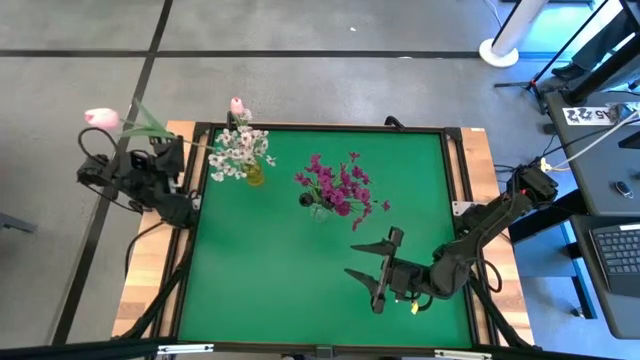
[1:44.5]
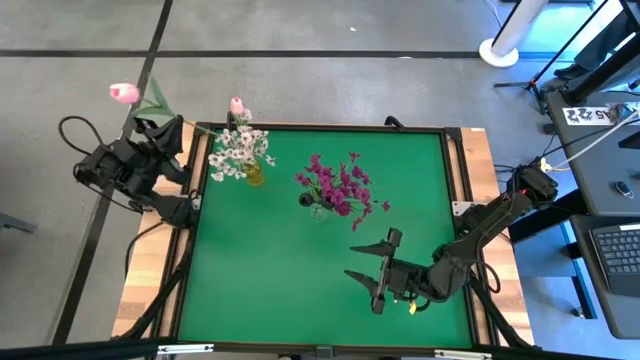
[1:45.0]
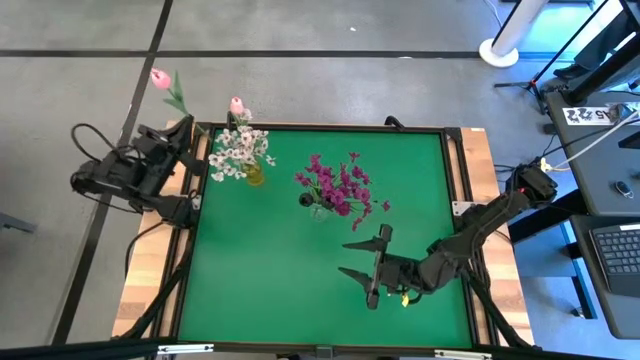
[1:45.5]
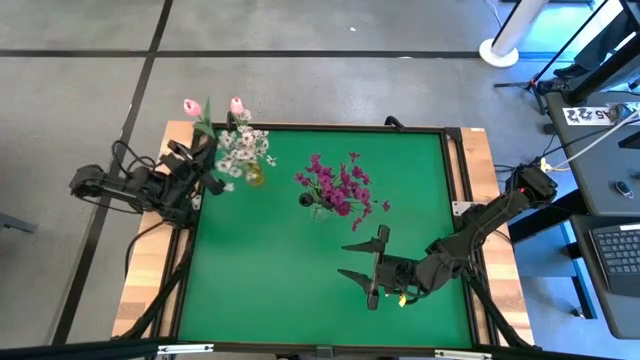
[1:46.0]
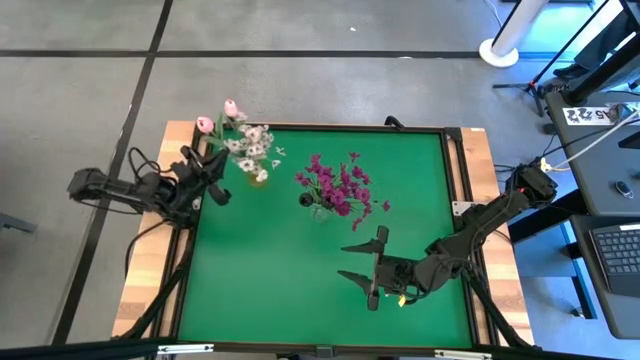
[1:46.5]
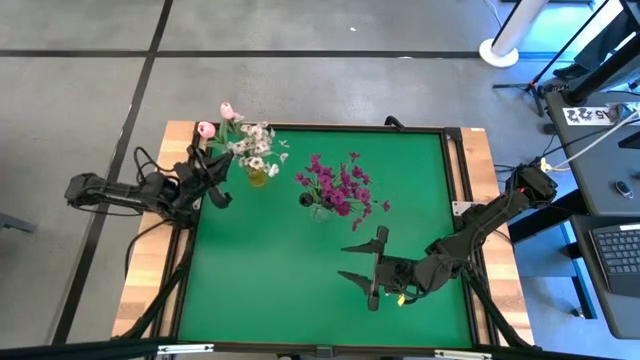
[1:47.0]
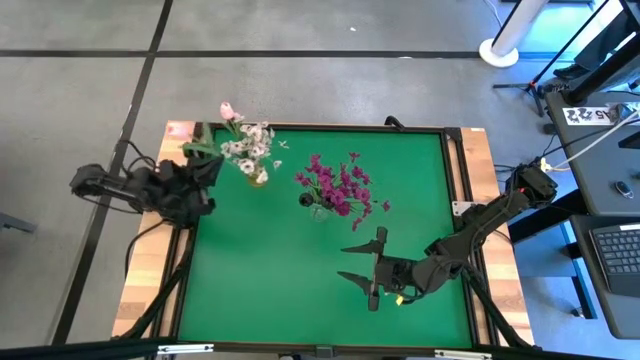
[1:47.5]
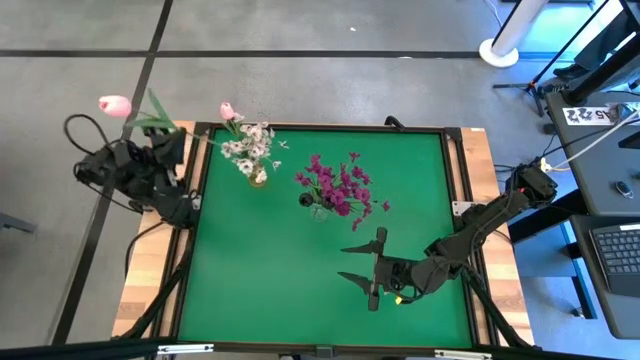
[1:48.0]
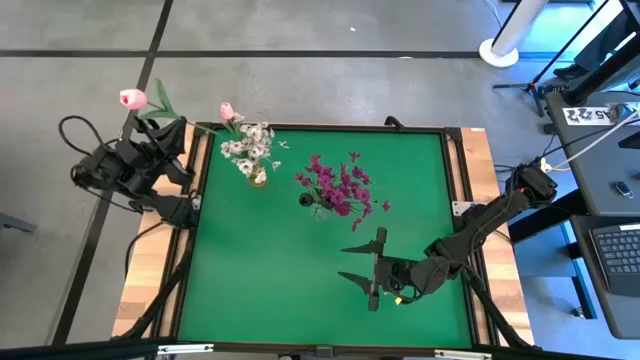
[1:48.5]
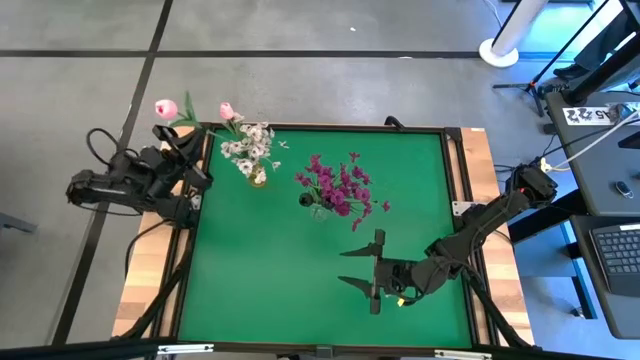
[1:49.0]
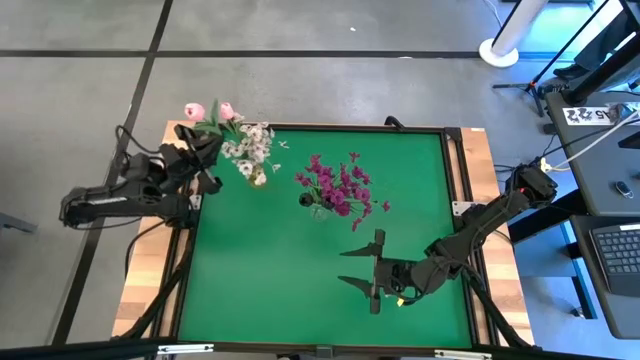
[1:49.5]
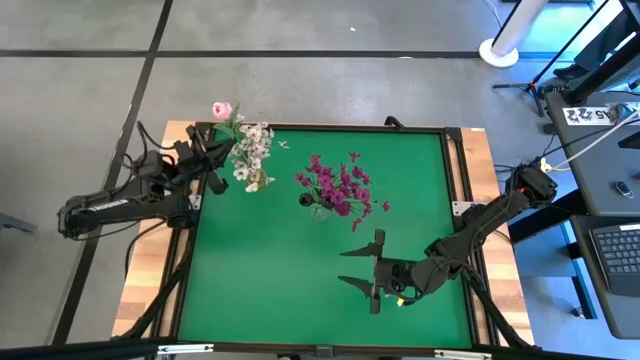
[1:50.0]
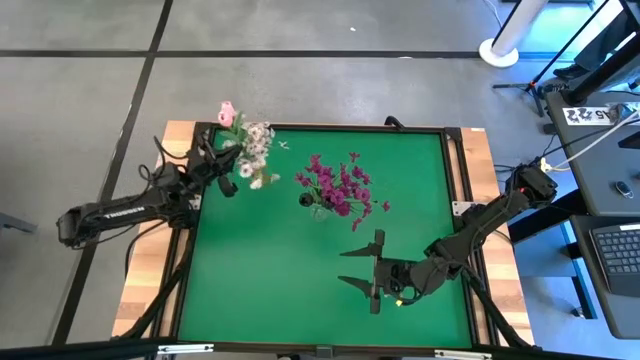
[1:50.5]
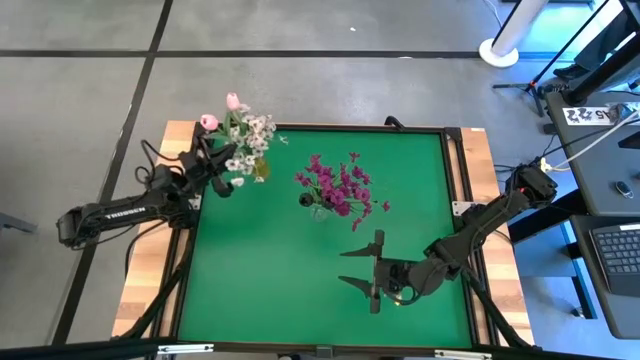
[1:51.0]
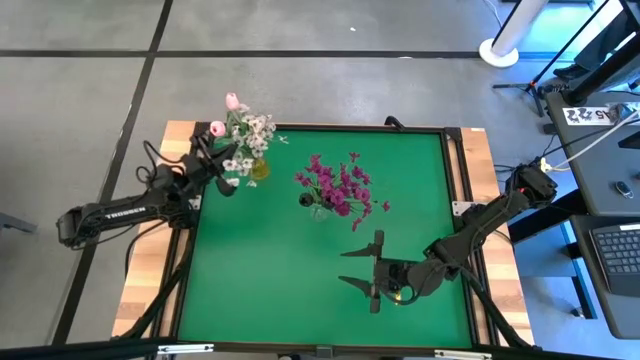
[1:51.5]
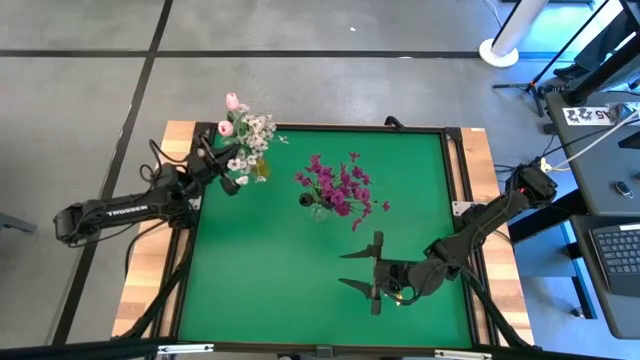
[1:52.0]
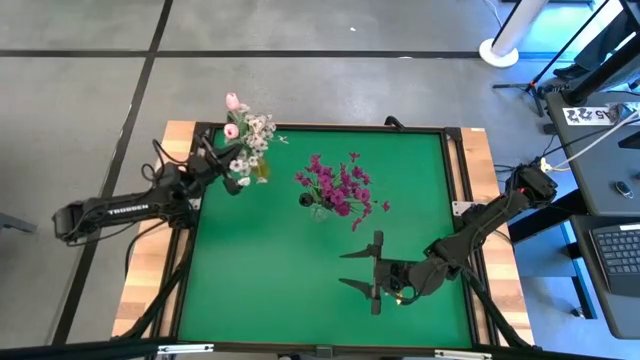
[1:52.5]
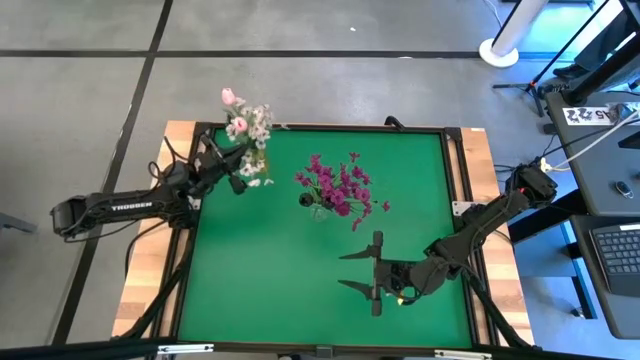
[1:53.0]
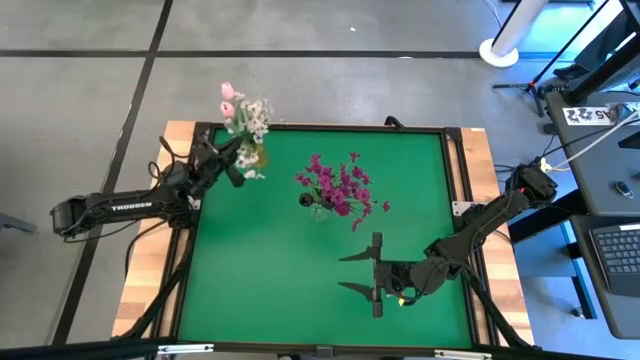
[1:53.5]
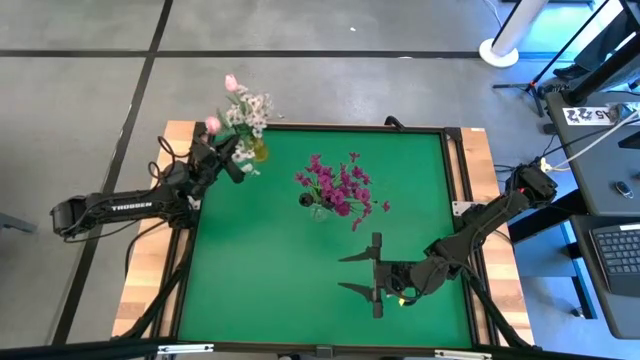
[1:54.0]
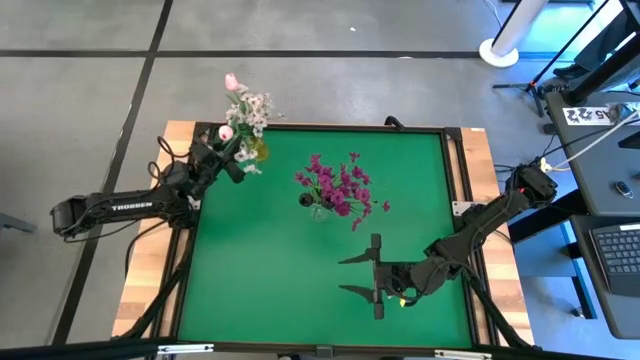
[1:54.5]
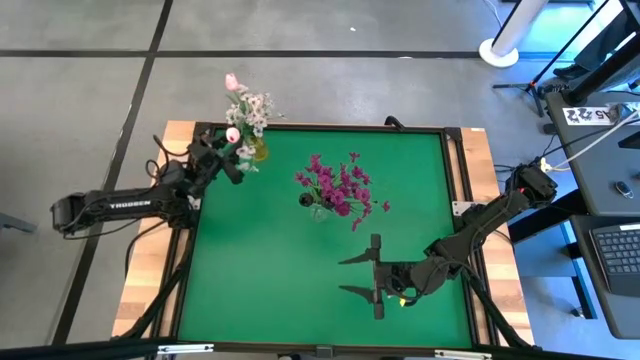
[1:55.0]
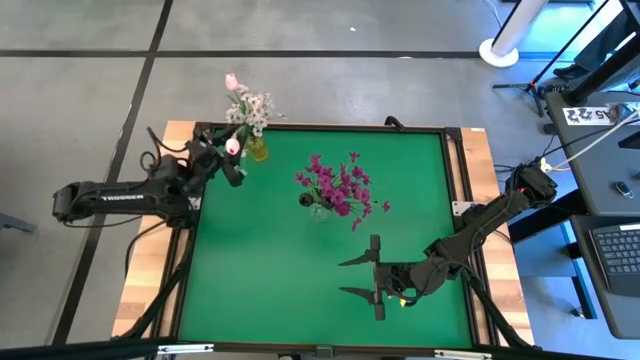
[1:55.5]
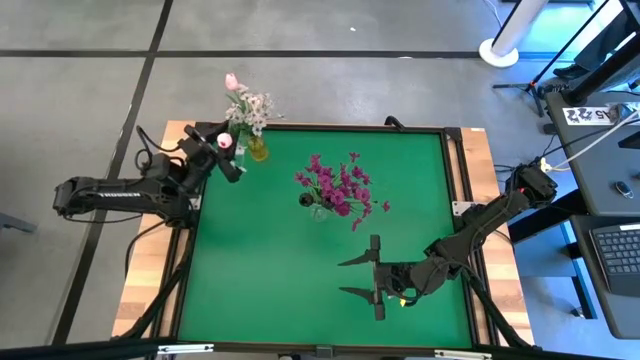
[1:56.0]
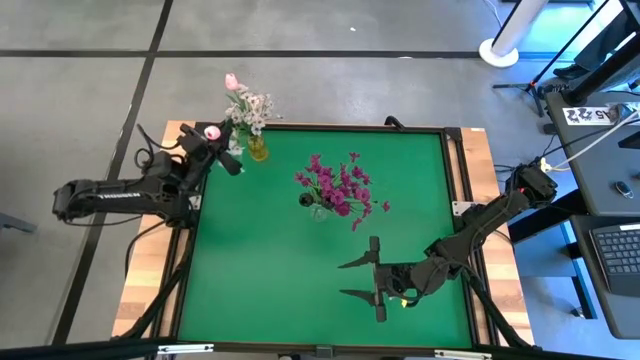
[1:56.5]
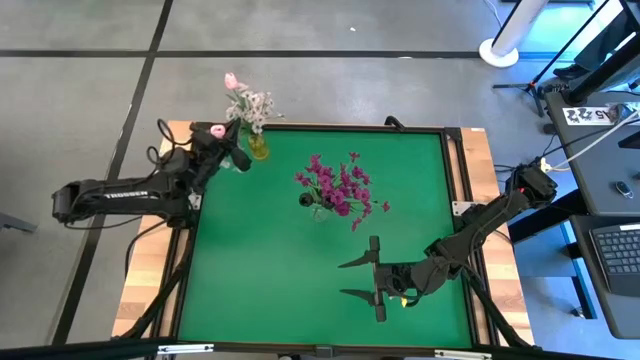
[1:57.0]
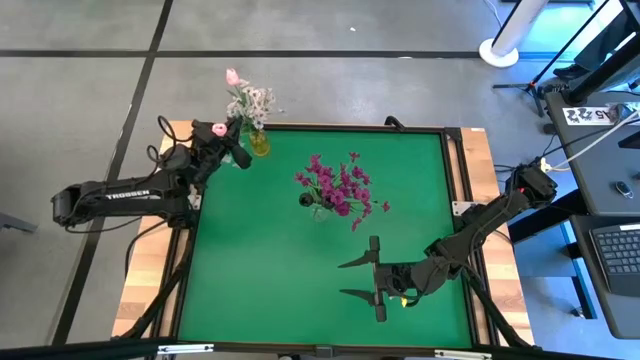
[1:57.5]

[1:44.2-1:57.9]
Task: Sort flowers into vase by color
Put the pink tulip into the yellow vase

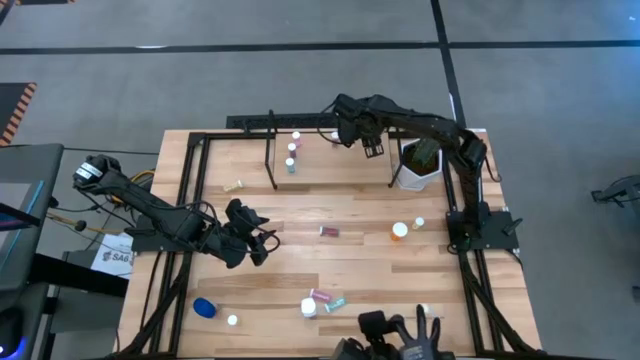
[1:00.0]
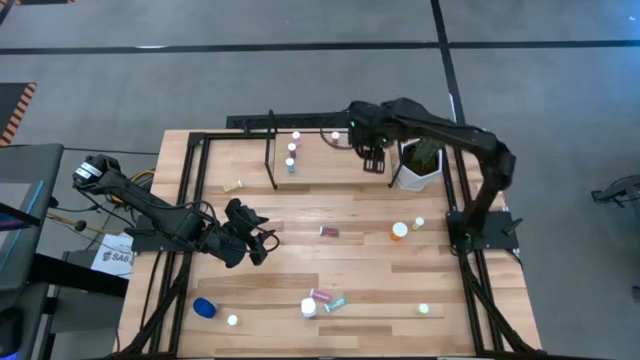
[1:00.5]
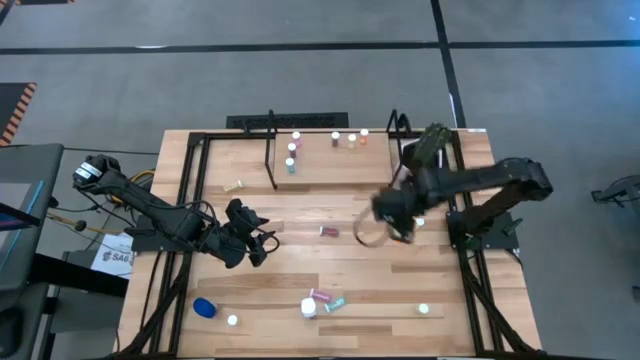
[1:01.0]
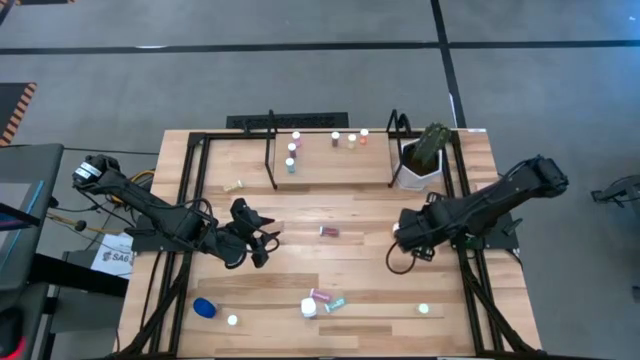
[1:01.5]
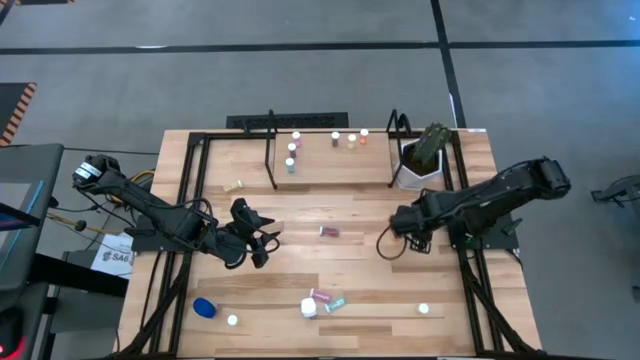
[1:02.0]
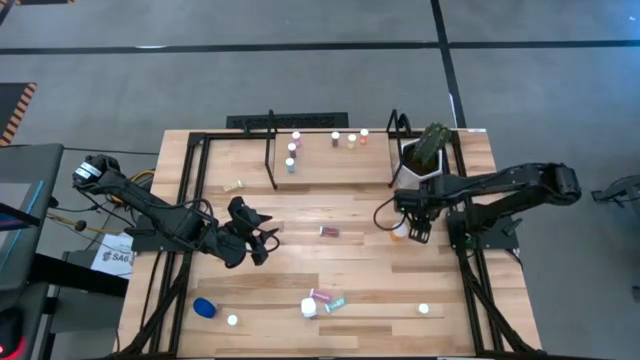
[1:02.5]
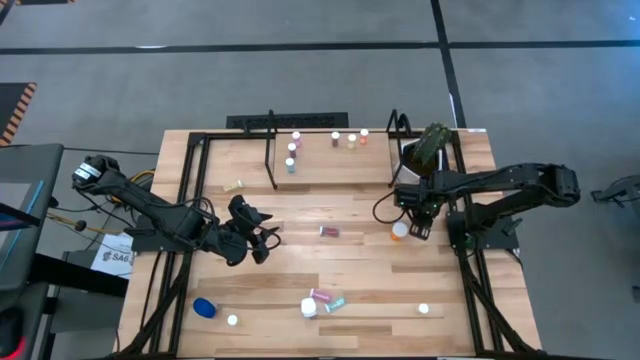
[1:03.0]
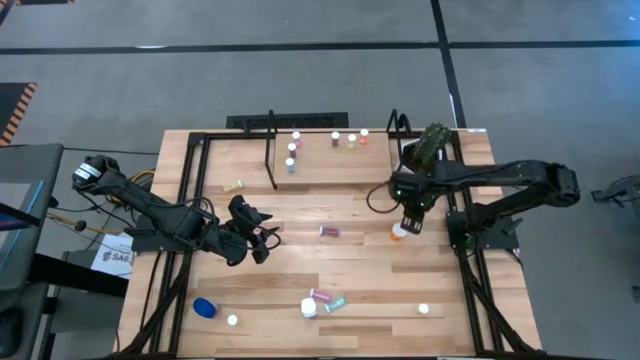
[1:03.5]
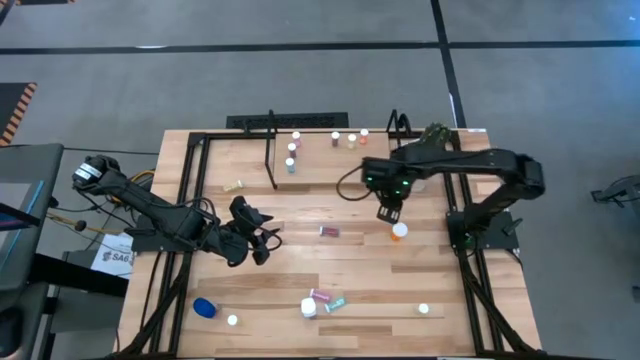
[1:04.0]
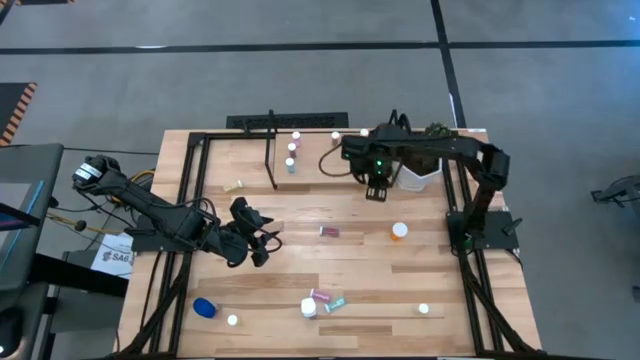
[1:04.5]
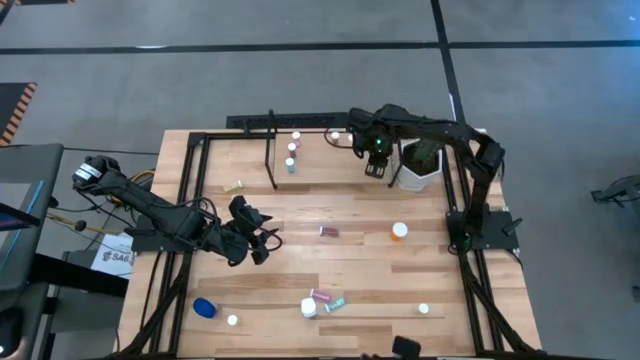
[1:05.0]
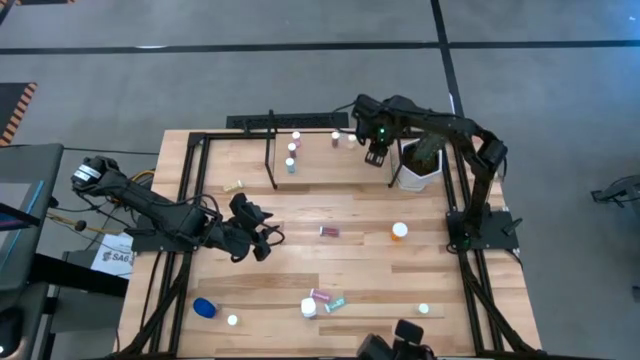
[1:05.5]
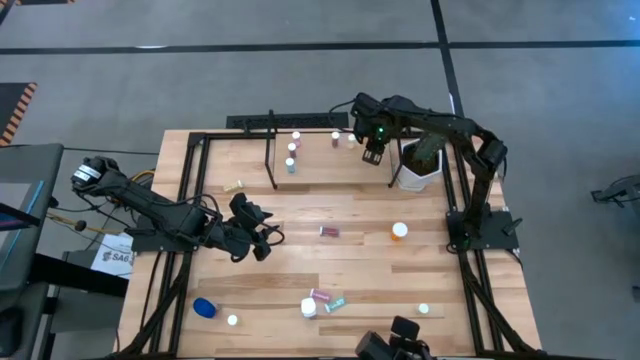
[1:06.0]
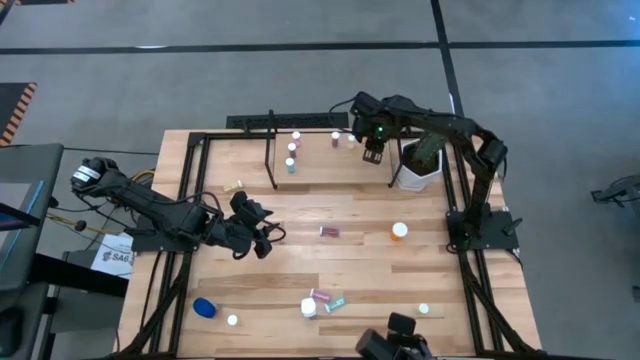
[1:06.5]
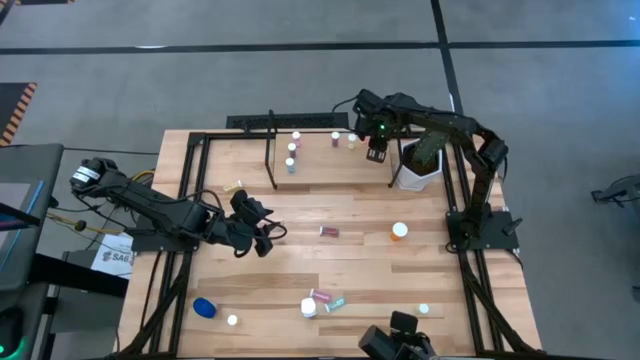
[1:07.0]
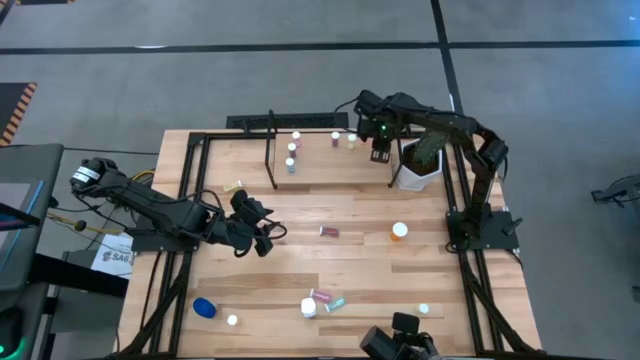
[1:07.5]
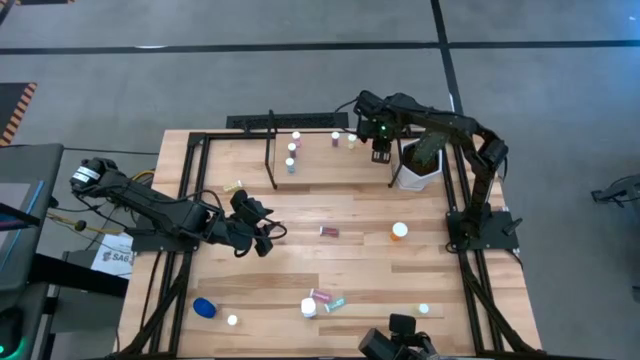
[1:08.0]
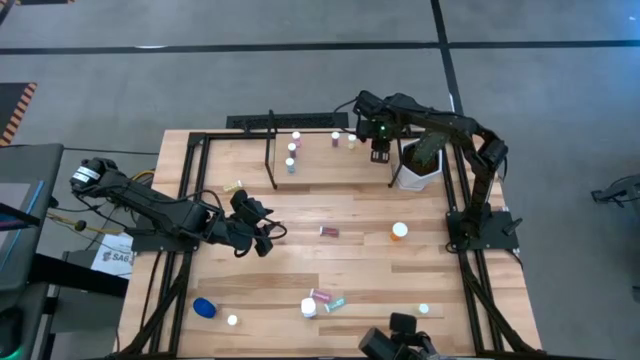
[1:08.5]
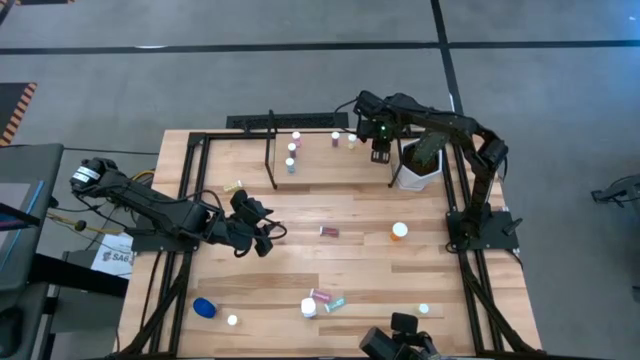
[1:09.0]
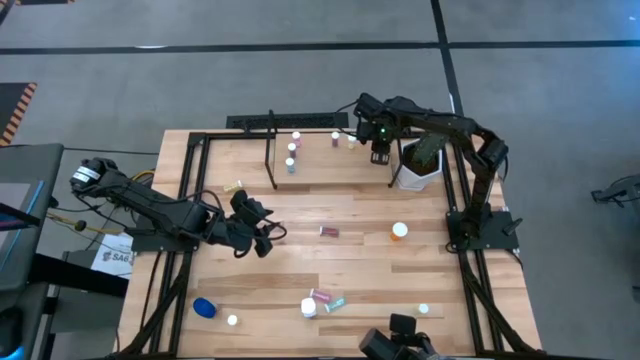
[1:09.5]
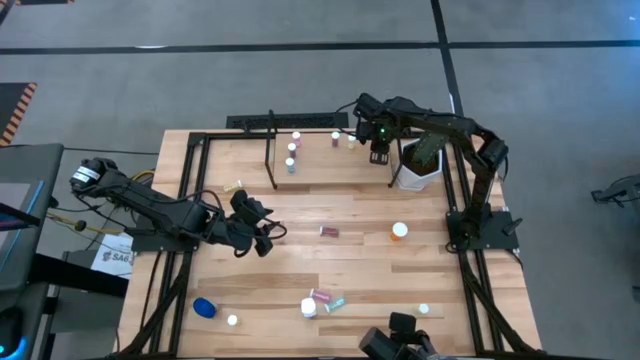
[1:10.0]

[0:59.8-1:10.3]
Task: Pick and place medicine bottles onto shelf by color
Put the yellow pill bottle on the shelf
